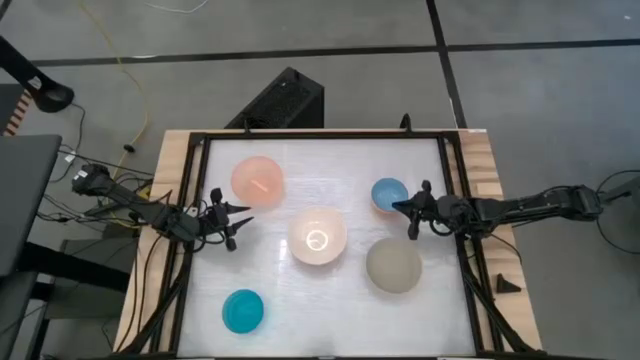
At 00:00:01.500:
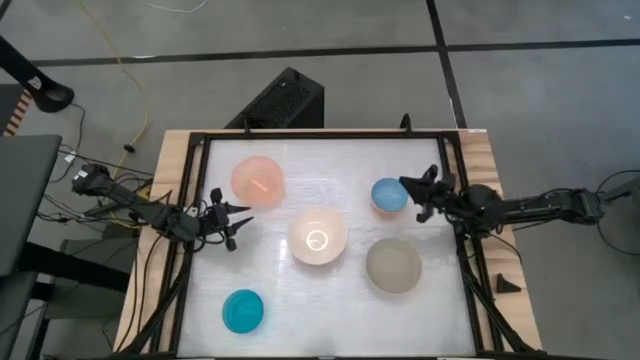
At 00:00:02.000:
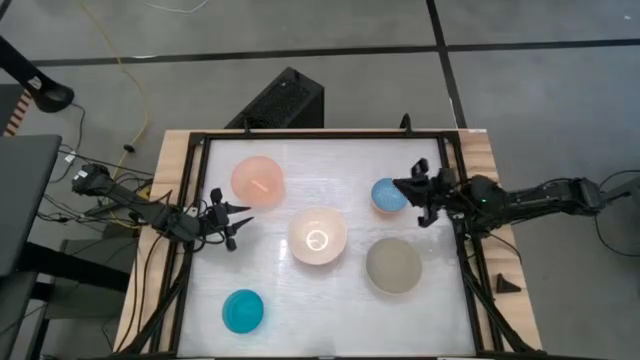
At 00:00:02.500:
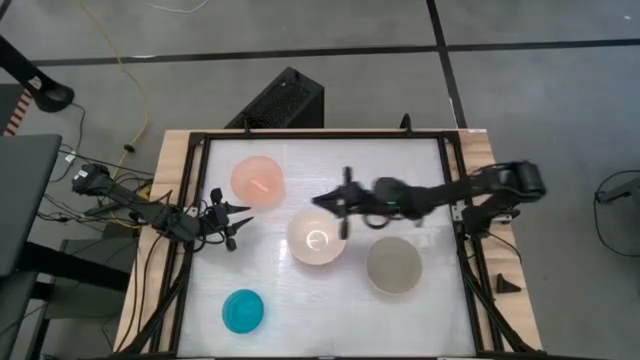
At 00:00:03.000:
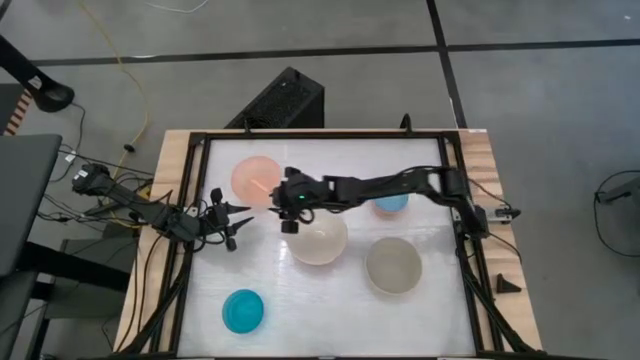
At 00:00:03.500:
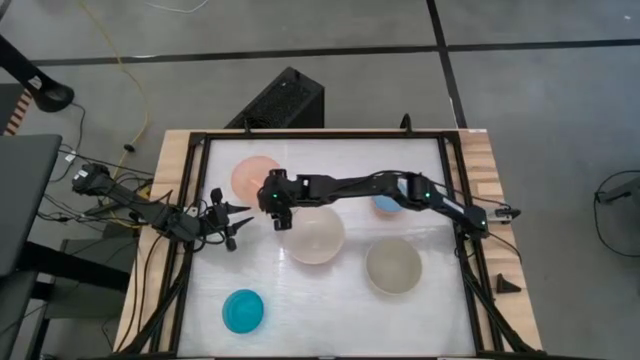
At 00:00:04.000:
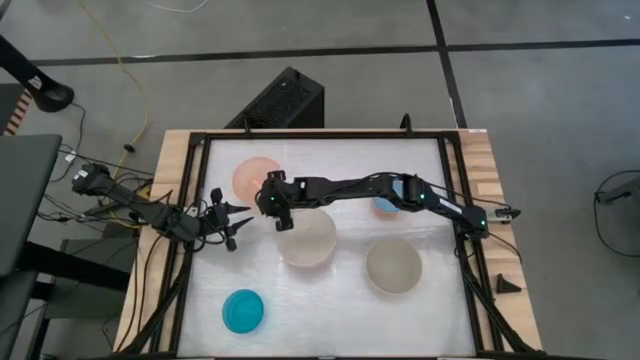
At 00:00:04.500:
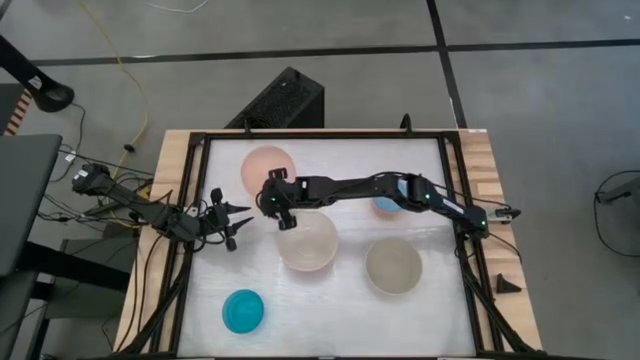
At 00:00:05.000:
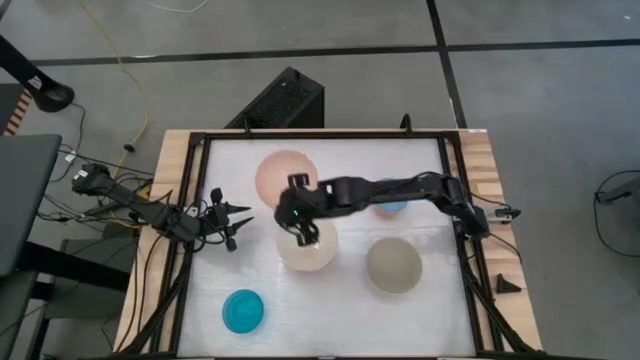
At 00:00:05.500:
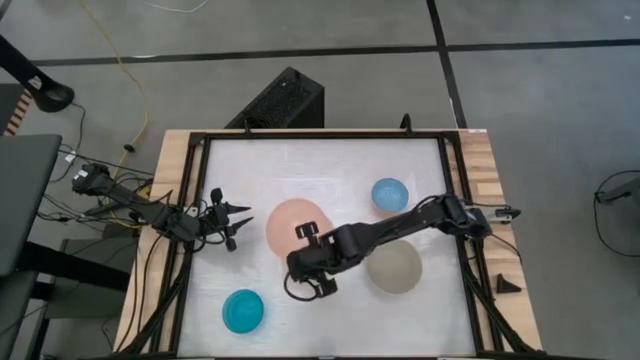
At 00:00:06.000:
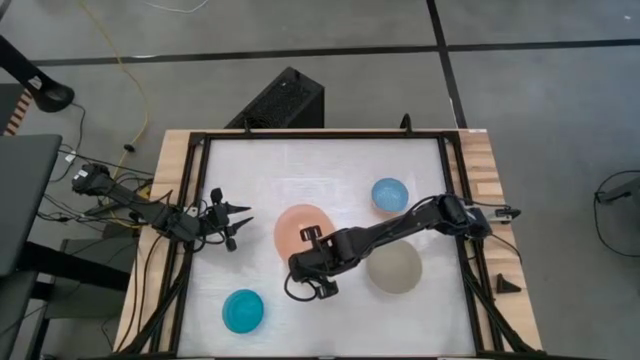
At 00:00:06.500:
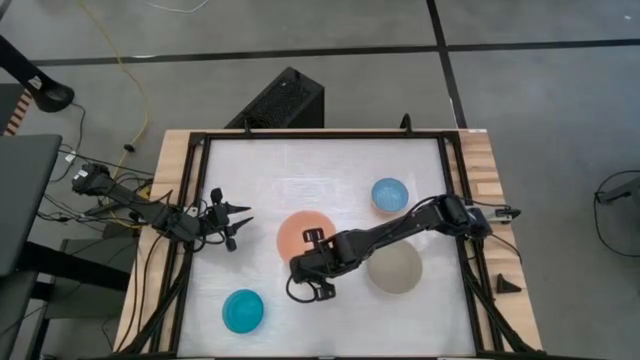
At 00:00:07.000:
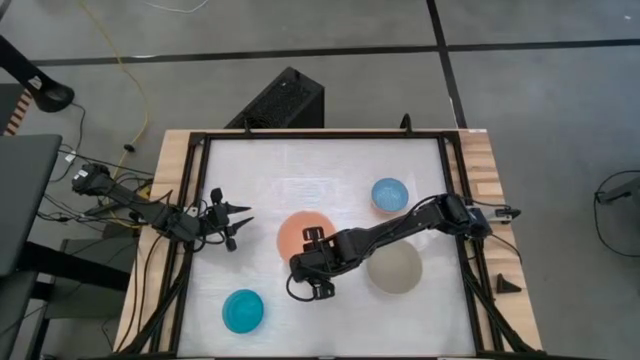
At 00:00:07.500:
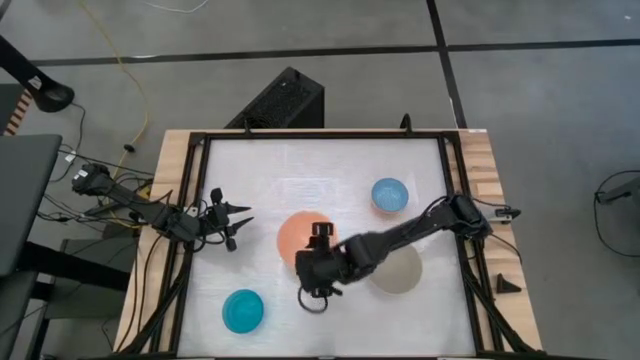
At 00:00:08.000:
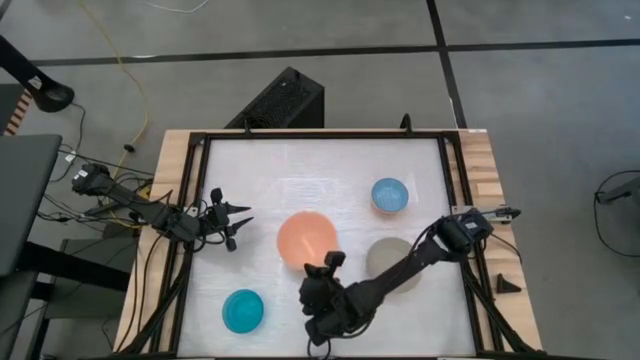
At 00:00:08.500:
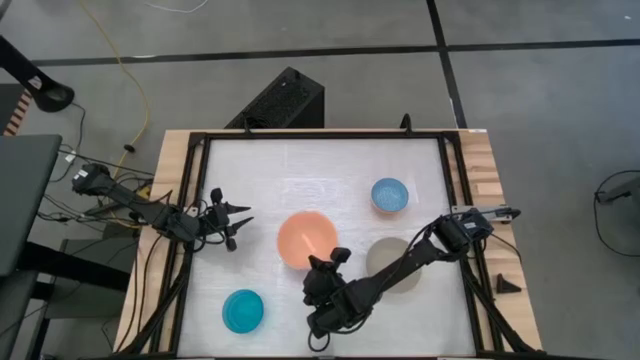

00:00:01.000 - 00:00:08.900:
Stack the pink bowl on the white bowl

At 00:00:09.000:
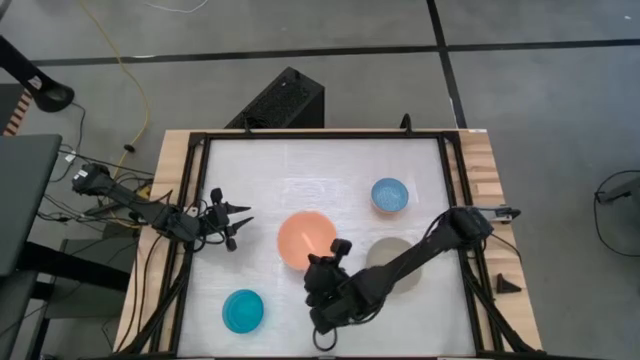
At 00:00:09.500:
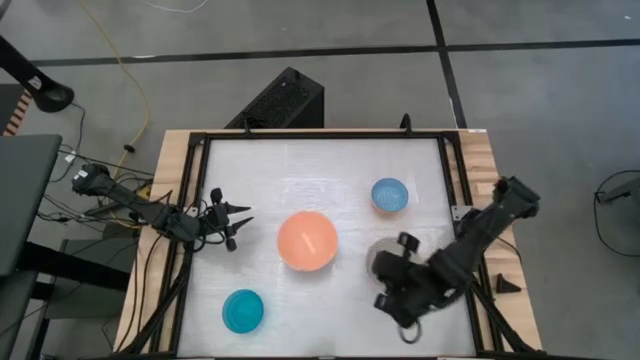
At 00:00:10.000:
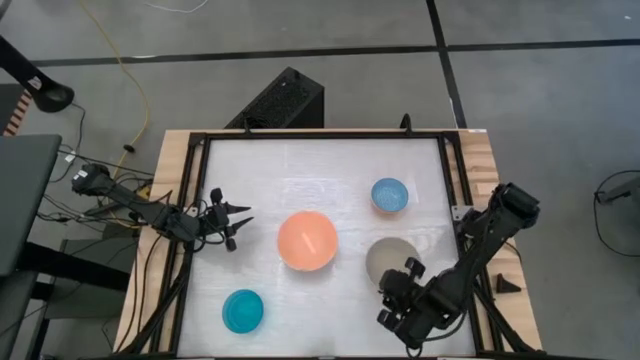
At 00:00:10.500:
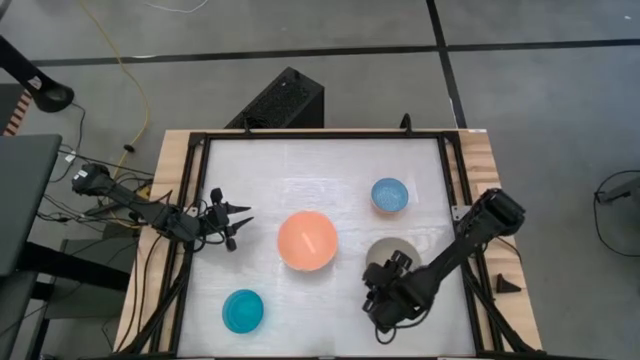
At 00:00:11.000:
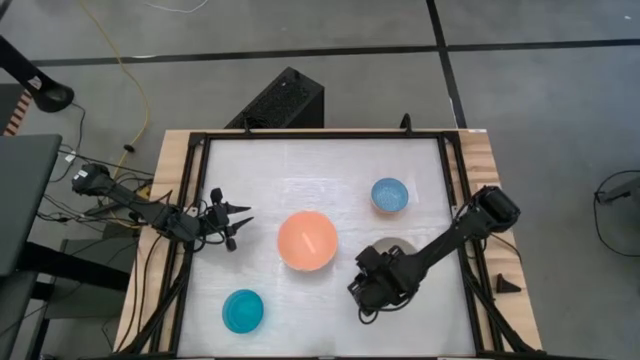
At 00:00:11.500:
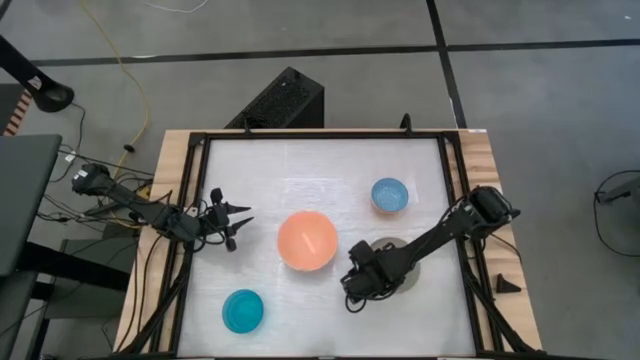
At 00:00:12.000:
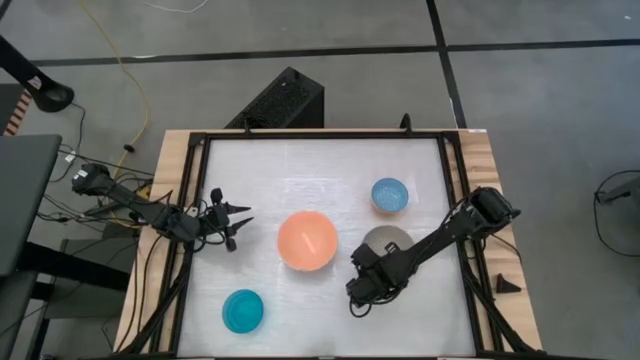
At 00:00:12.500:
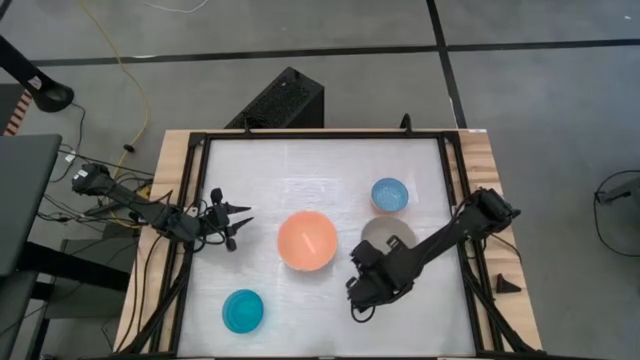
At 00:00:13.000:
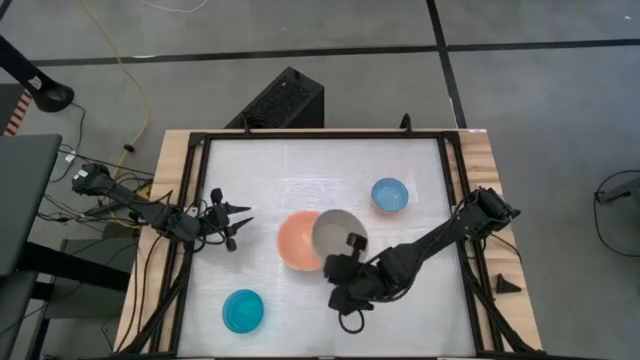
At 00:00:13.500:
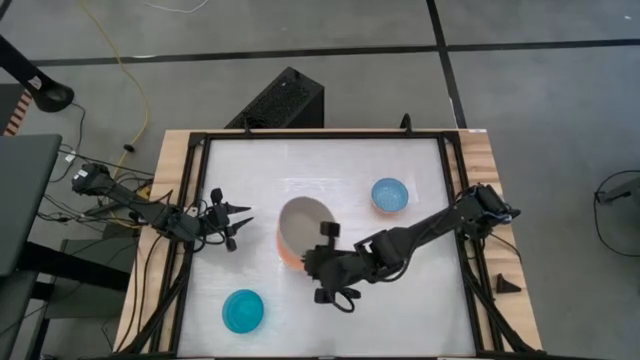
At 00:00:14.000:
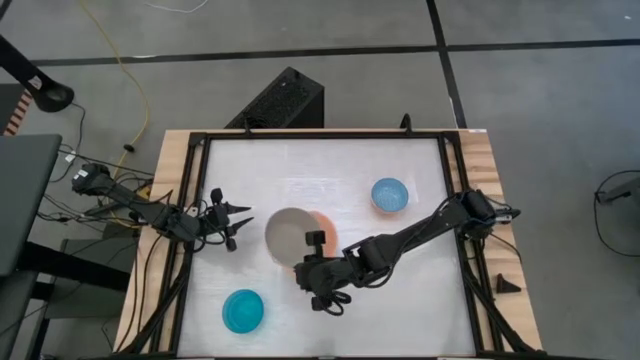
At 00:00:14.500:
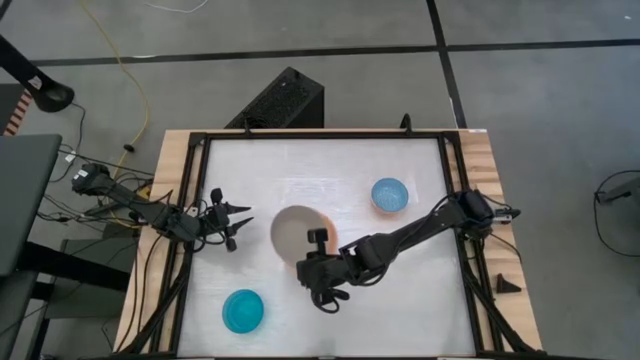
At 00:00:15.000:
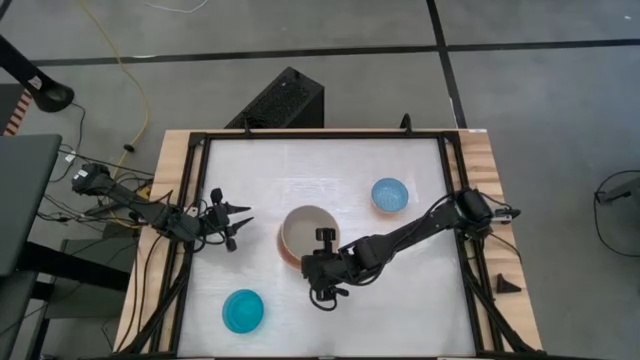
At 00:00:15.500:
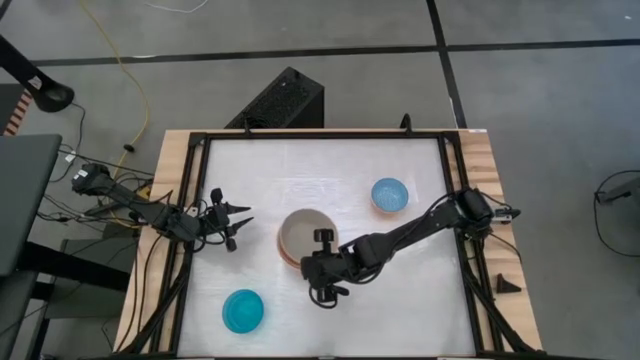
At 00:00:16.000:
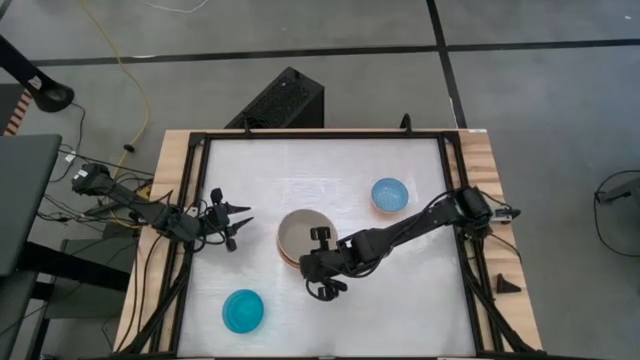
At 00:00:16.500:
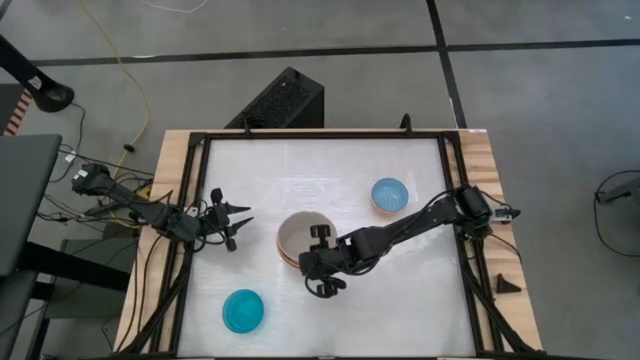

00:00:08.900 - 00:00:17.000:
Stack the white bowl on the pink bowl

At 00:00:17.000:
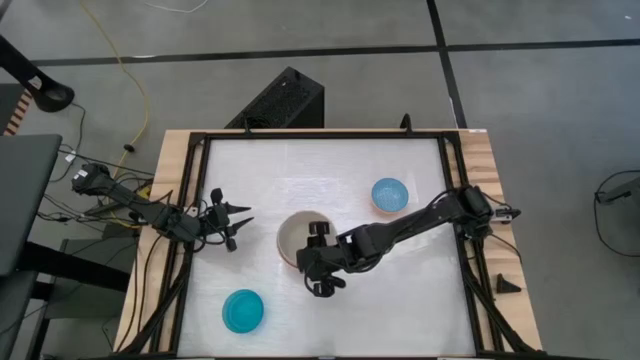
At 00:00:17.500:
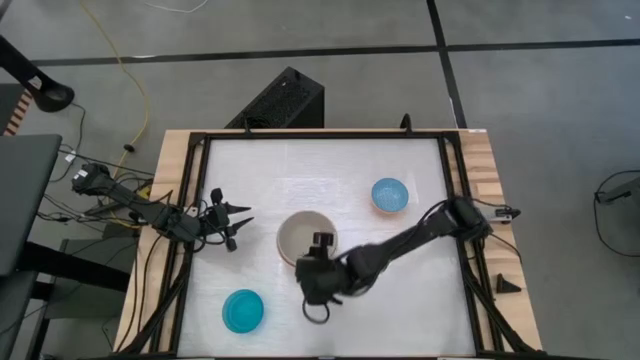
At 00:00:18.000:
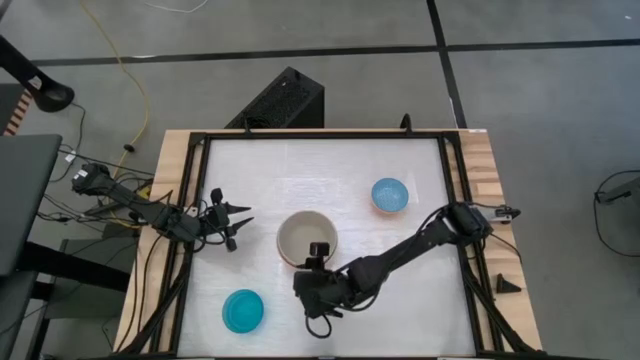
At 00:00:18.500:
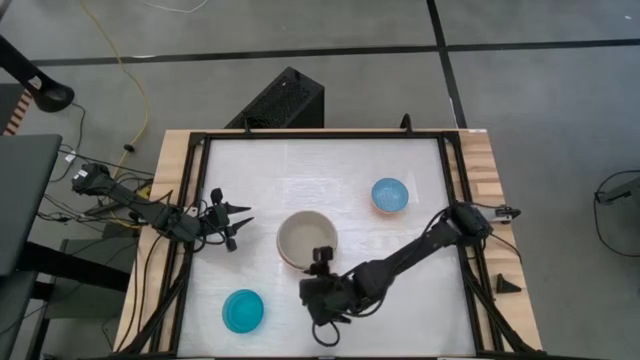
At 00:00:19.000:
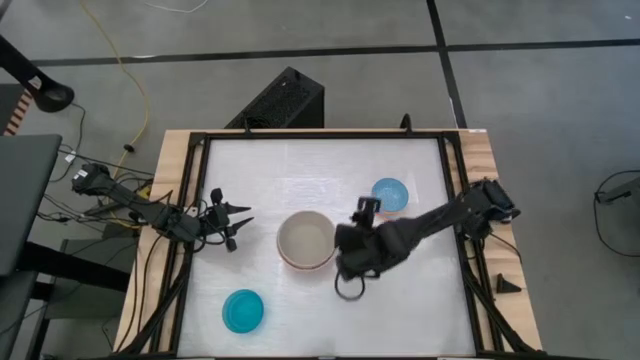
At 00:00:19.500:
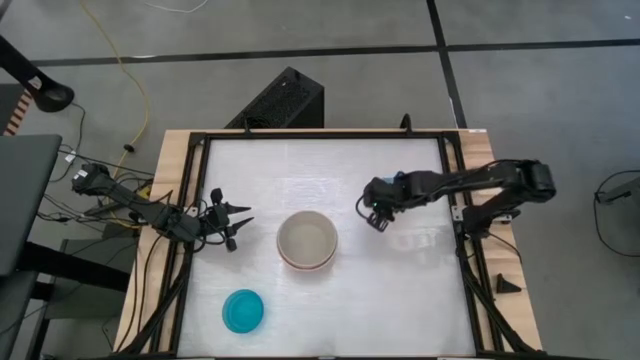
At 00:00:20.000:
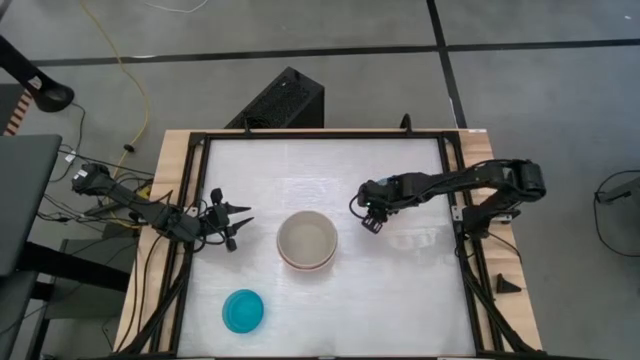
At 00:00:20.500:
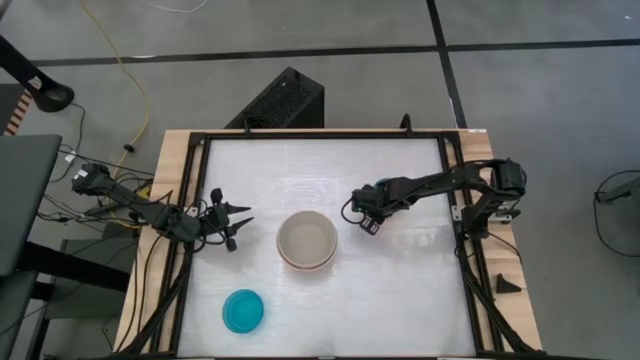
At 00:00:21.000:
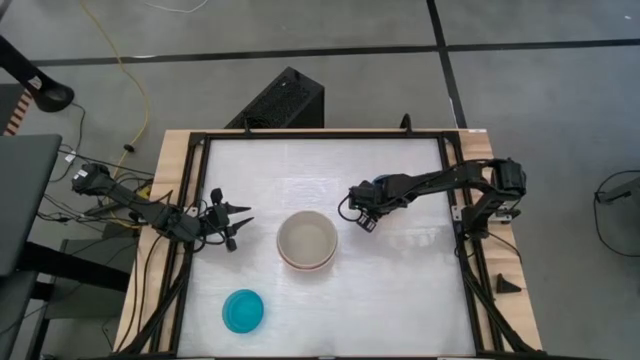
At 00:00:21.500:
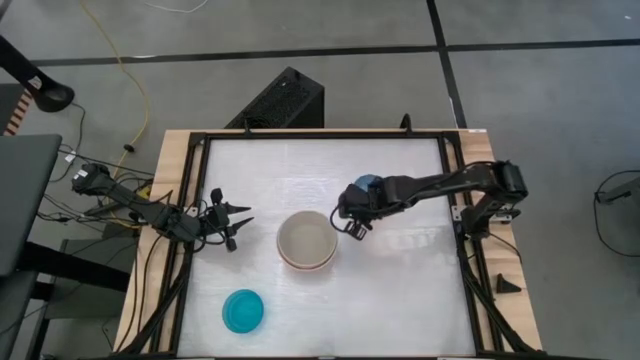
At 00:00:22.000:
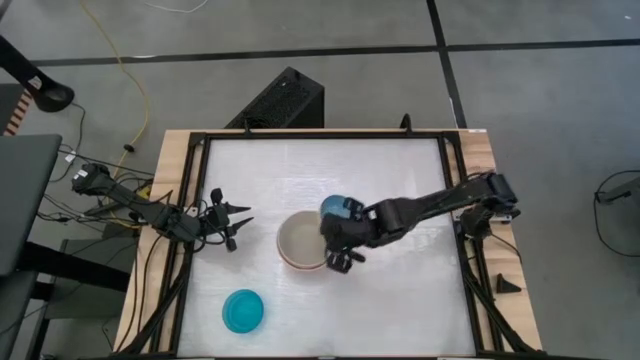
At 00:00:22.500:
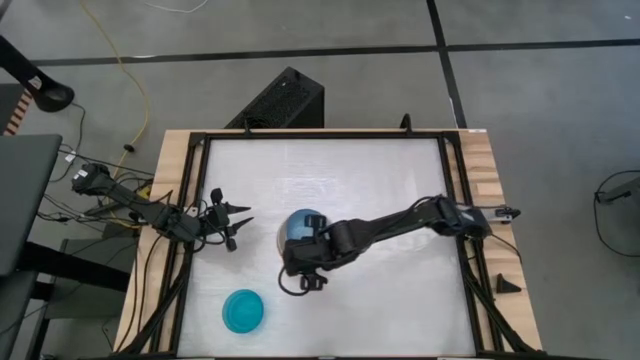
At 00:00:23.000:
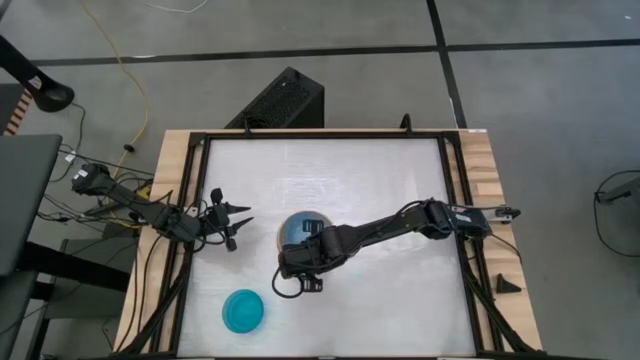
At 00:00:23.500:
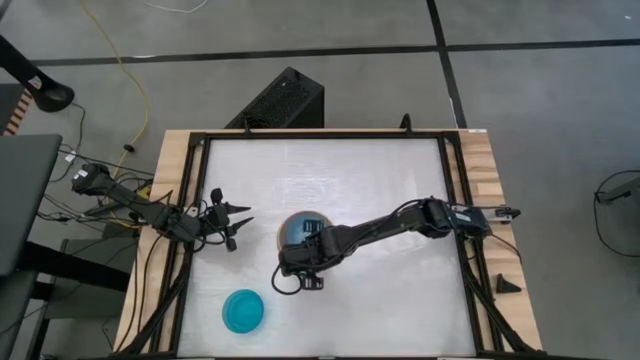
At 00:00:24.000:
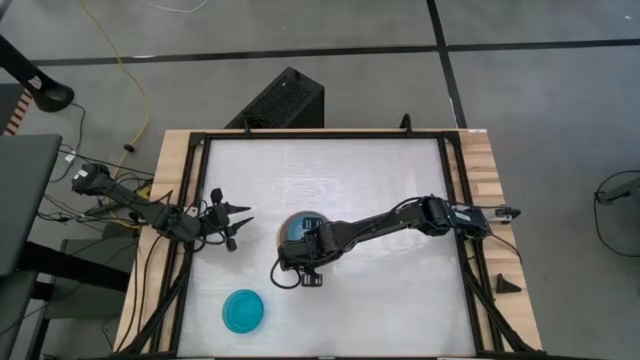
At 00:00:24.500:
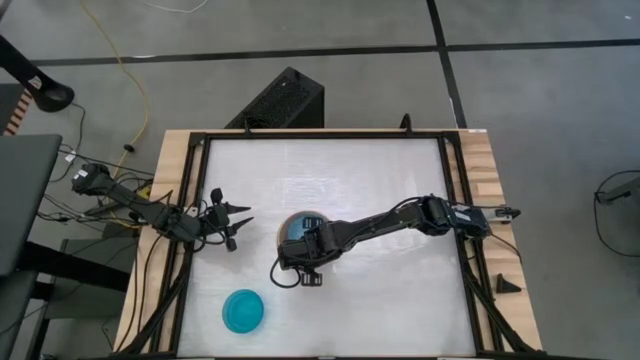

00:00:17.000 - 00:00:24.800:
Stack the blue patterned bowl on the white bowl
